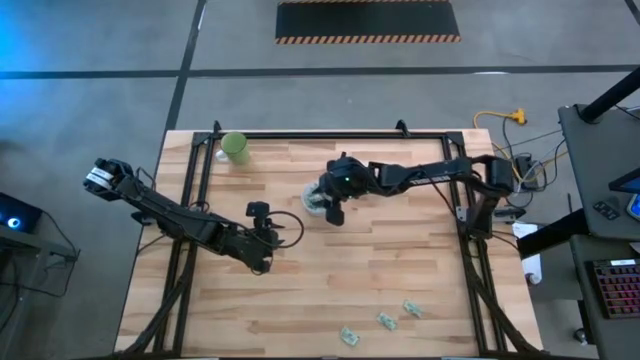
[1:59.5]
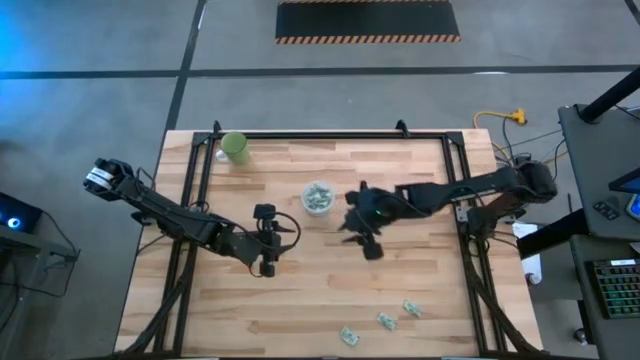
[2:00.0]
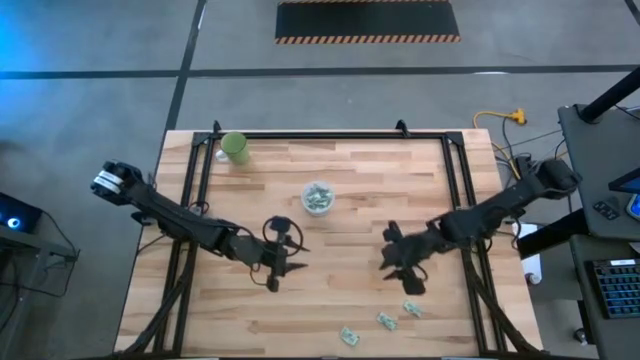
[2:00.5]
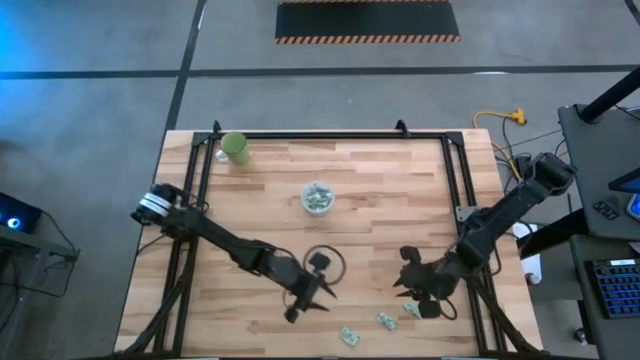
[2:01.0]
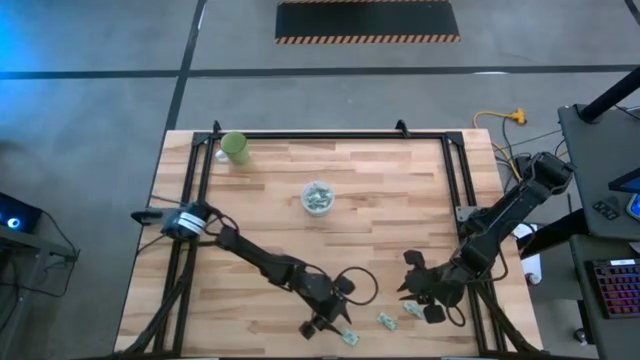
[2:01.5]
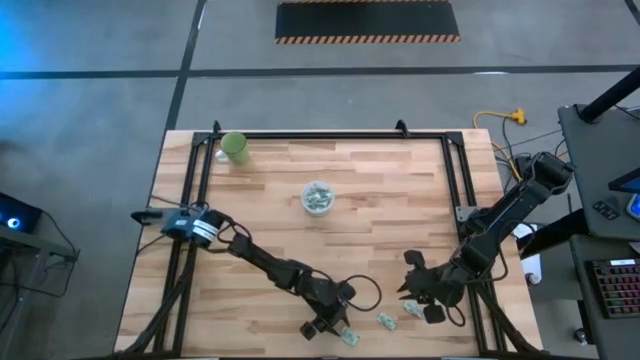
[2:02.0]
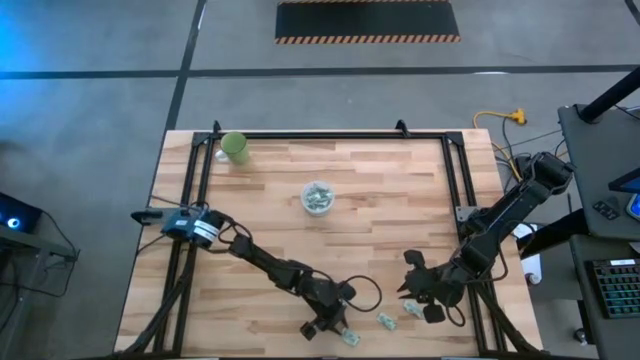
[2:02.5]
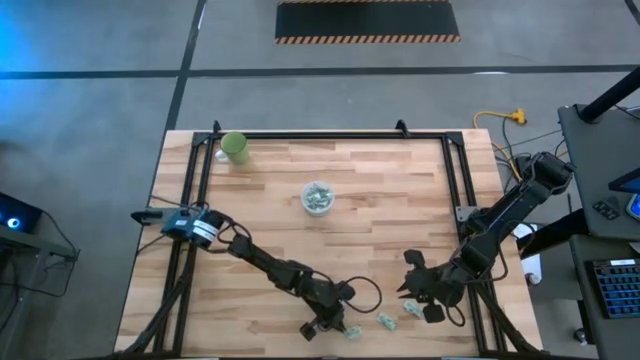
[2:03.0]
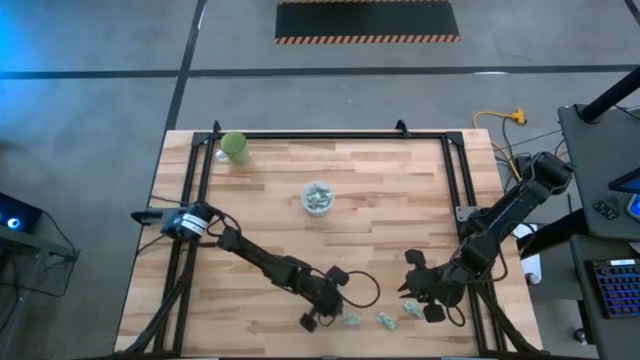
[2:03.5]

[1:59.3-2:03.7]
Task: Pick and place Stevia / Truvia into bins
Put the green stevia packet into the transparent container

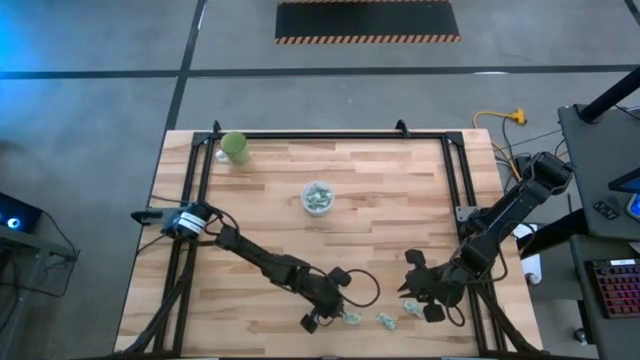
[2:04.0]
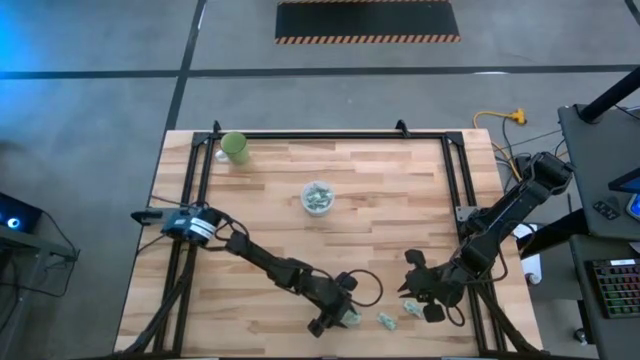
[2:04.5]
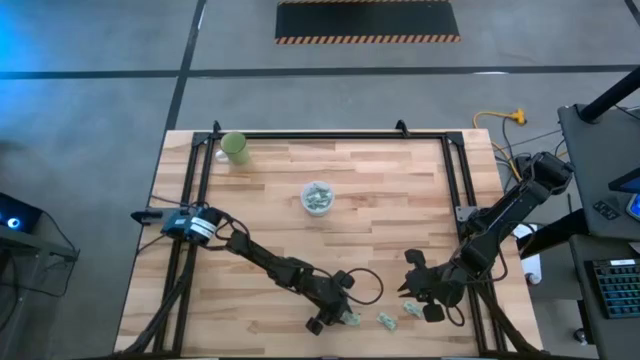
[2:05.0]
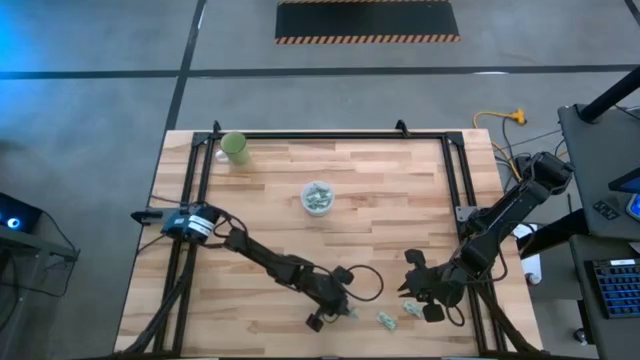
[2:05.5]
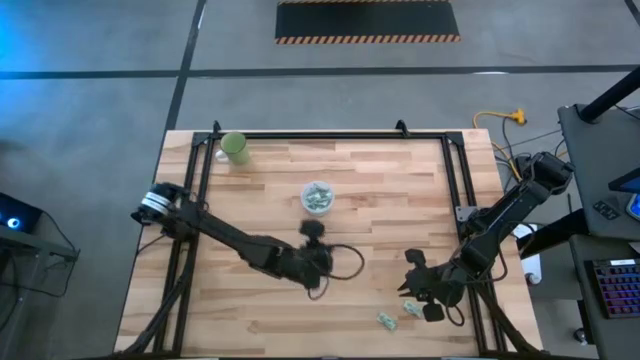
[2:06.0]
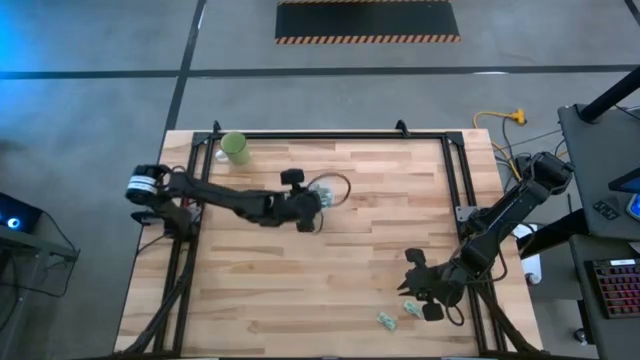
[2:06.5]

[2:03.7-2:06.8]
Put the green stevia packet into the transparent container

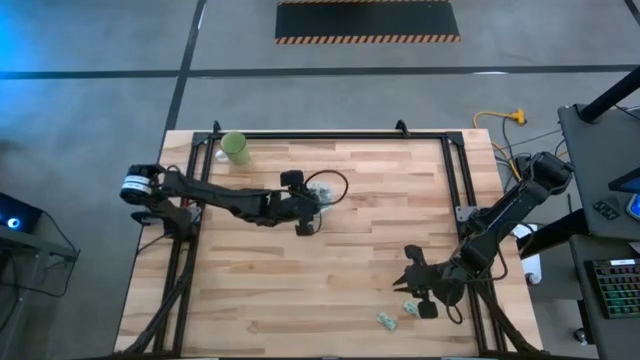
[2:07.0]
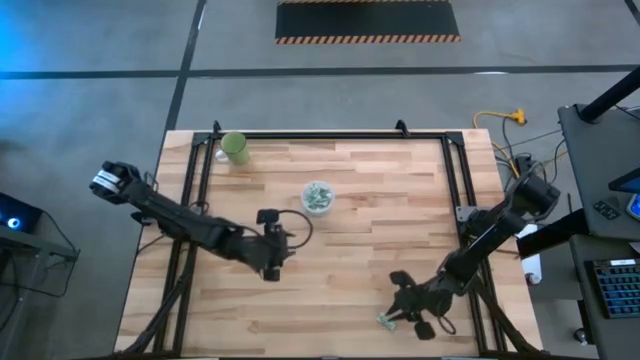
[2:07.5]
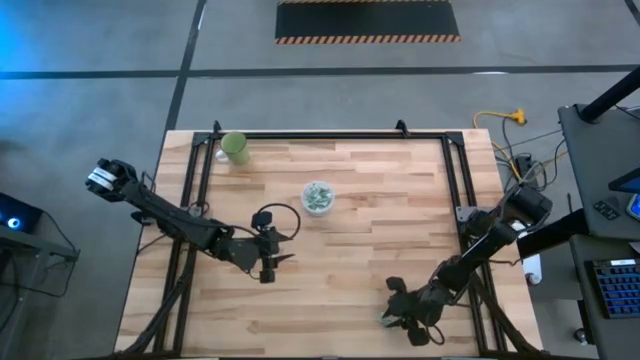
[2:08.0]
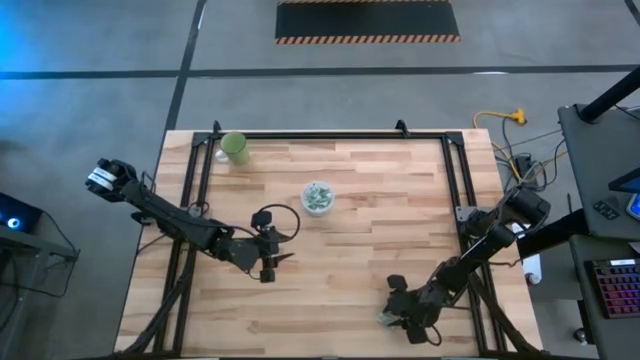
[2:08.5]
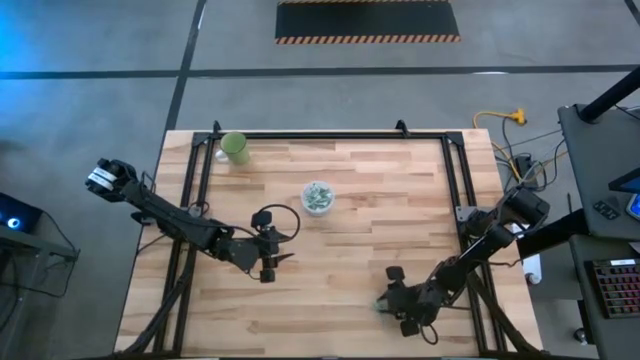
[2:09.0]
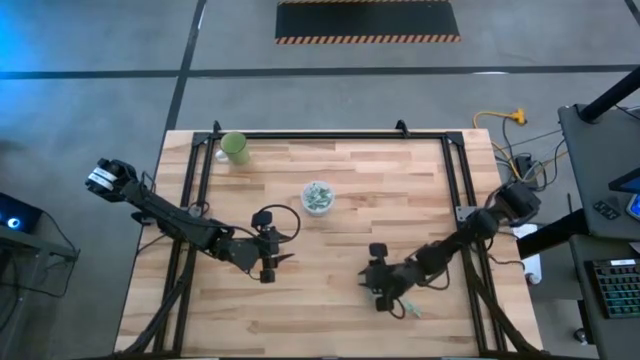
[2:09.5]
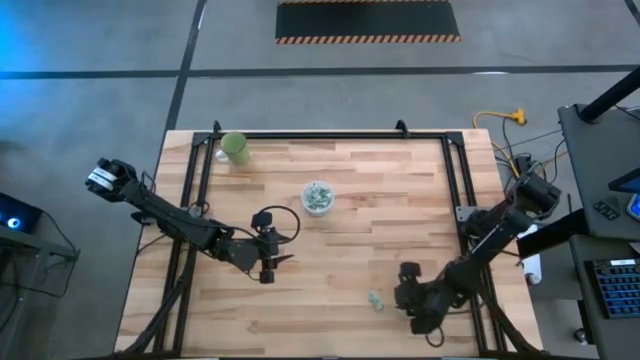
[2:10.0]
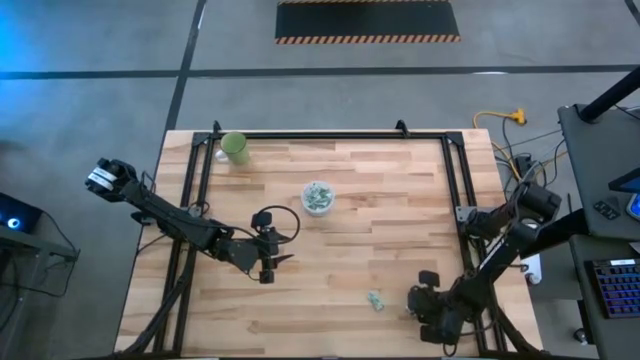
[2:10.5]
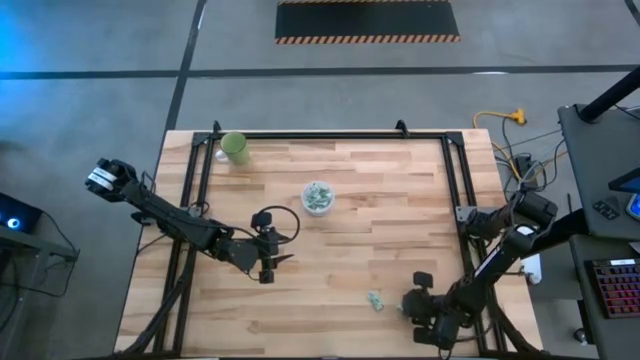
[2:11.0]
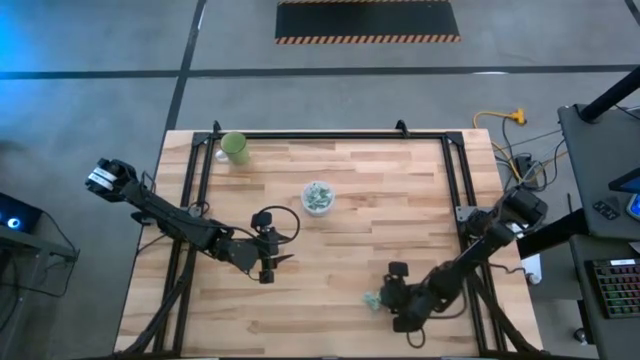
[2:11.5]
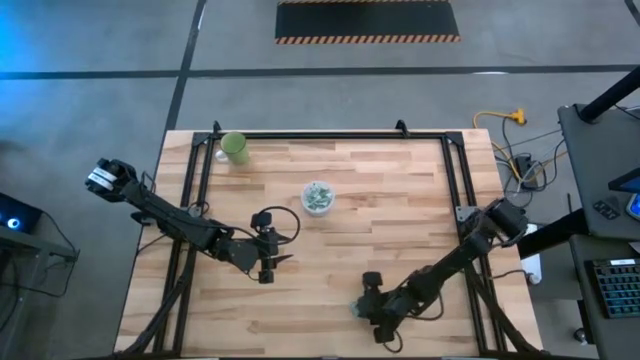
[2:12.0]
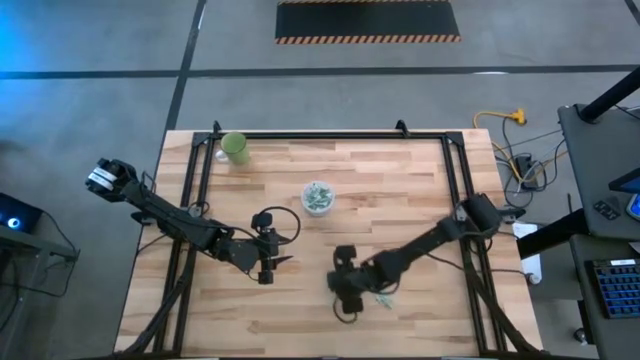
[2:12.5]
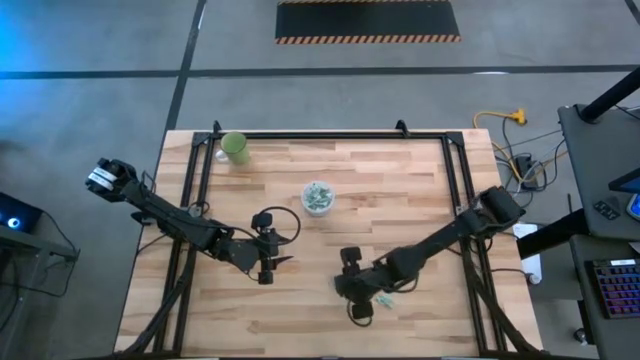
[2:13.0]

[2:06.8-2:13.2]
Put the green stevia packet into the transparent container

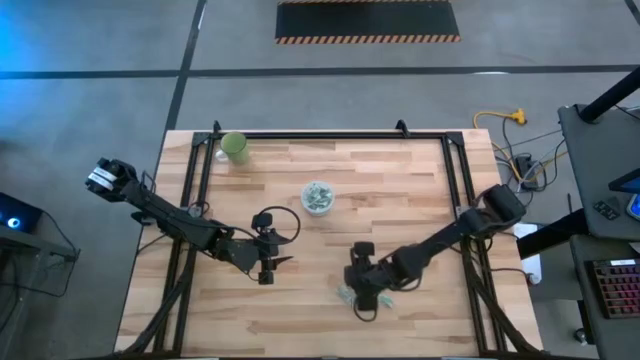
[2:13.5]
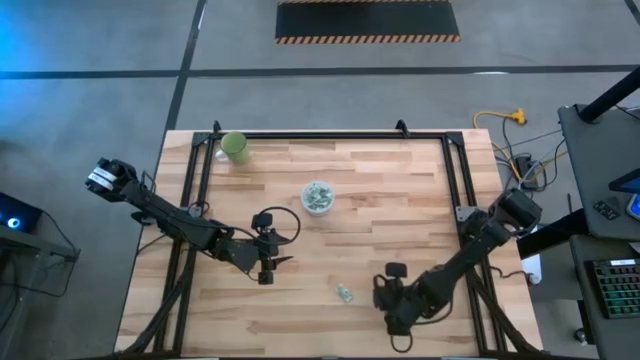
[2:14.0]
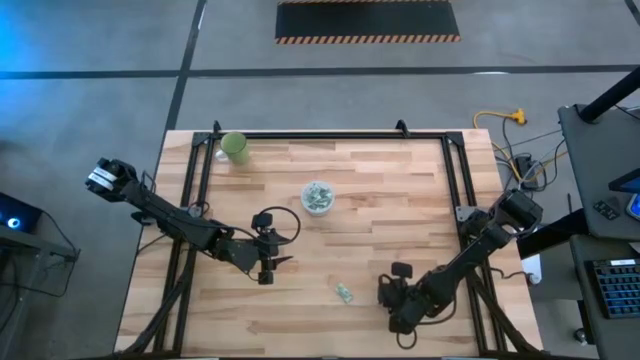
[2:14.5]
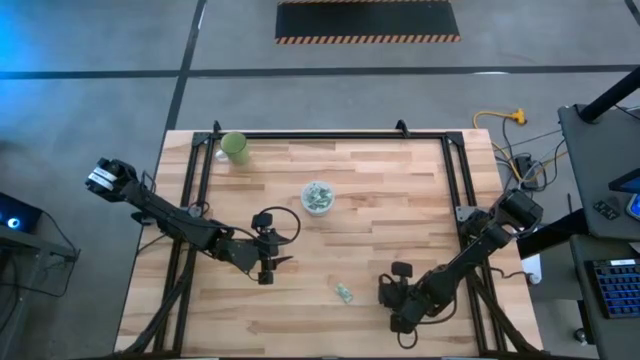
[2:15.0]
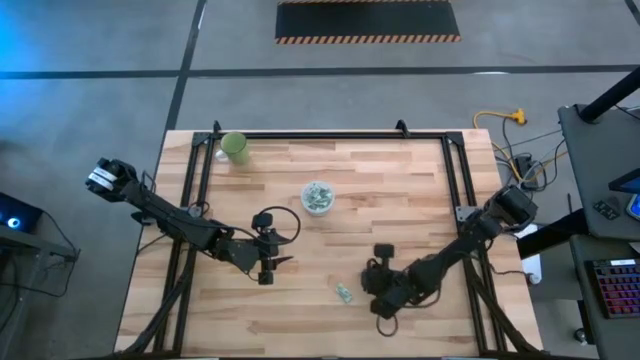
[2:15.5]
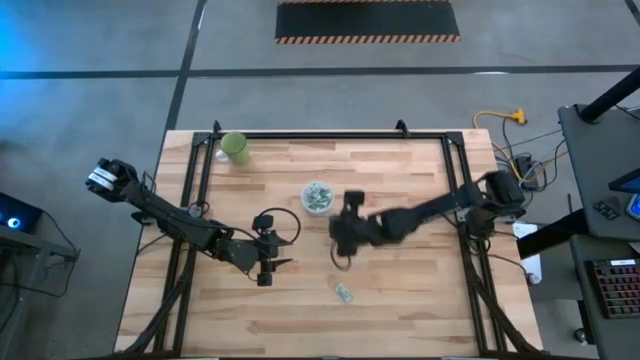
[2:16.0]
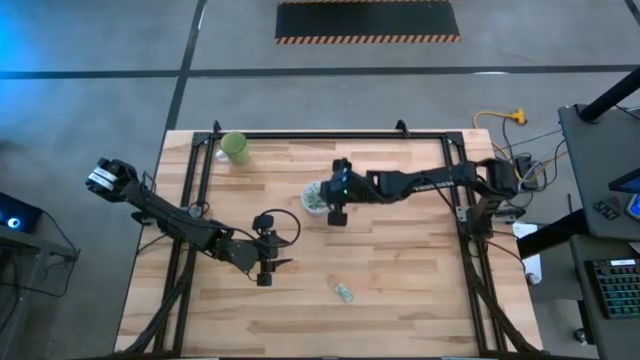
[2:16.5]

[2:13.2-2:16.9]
Put the green stevia packet into the transparent container

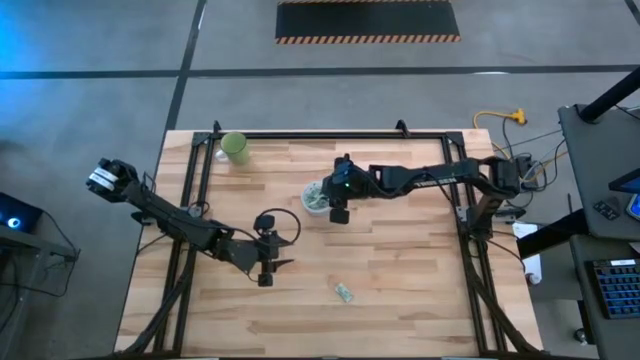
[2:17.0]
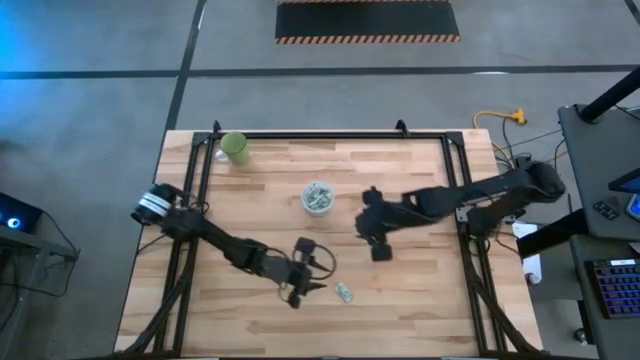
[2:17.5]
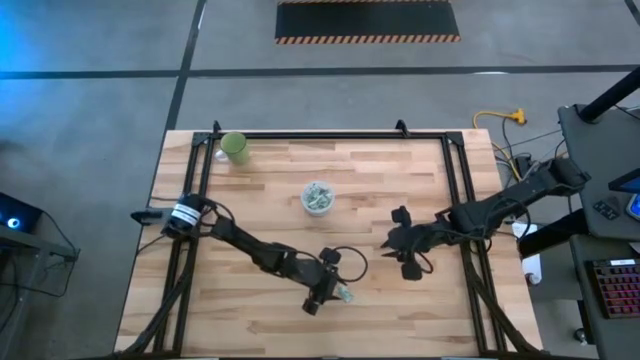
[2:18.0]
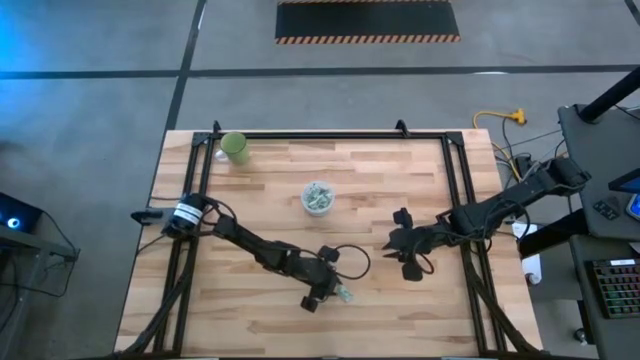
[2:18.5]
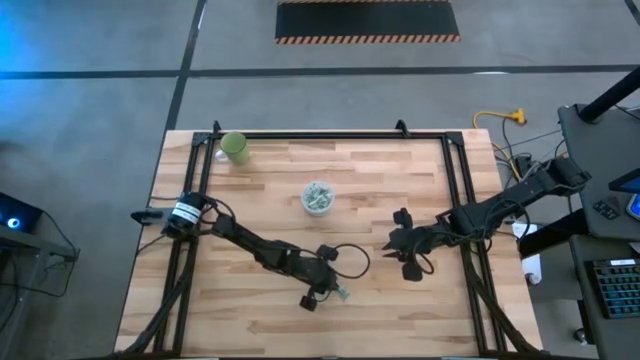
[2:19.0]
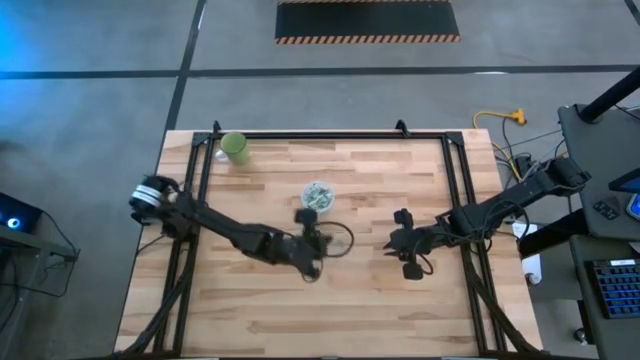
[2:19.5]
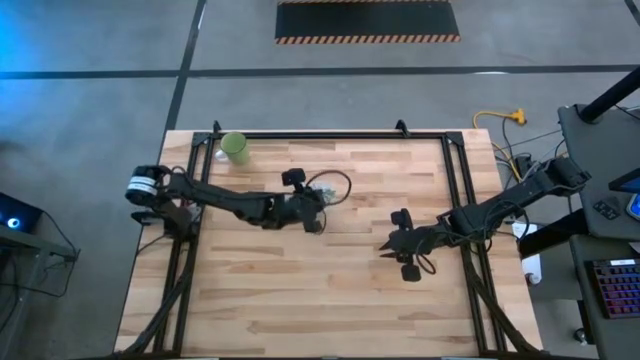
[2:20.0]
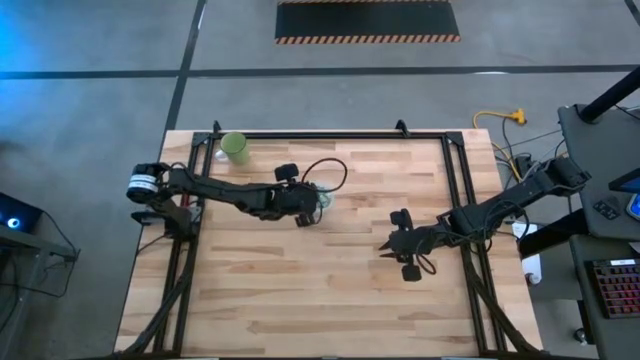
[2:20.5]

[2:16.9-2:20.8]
Put the green stevia packet into the transparent container
